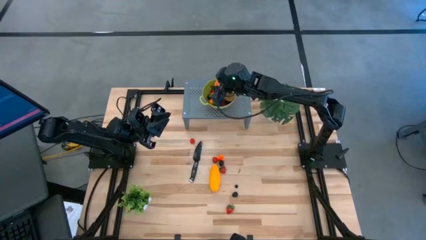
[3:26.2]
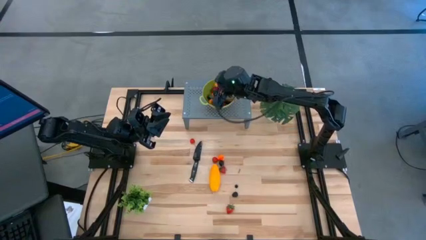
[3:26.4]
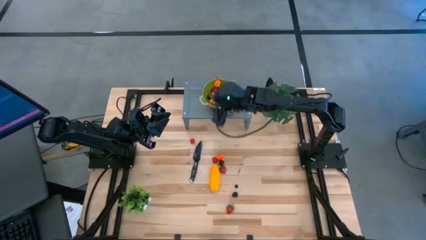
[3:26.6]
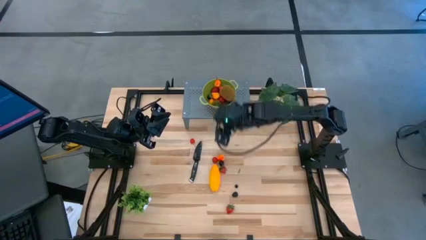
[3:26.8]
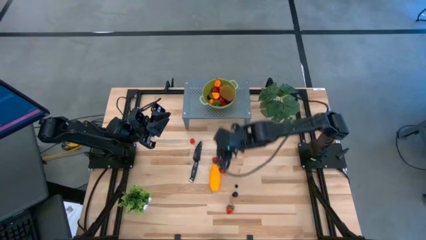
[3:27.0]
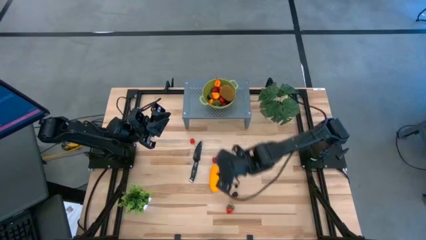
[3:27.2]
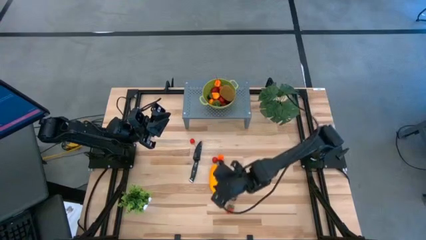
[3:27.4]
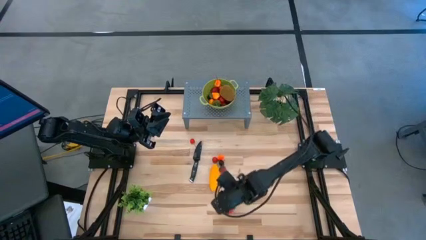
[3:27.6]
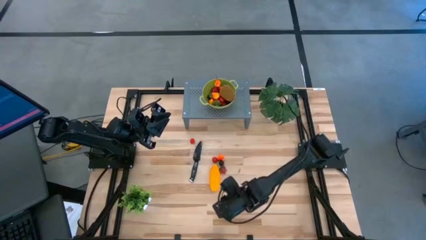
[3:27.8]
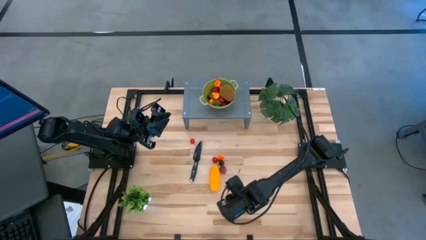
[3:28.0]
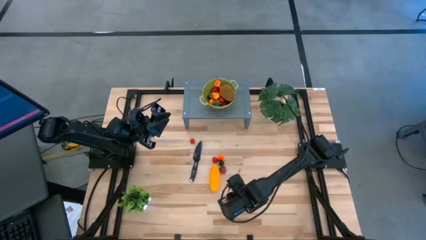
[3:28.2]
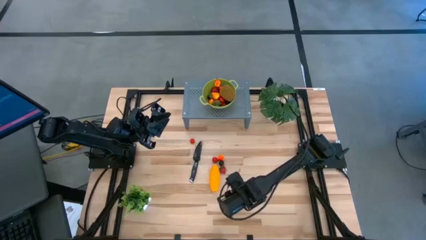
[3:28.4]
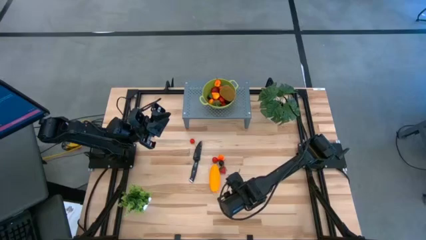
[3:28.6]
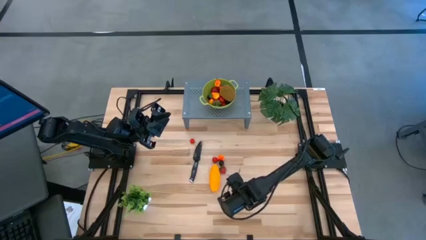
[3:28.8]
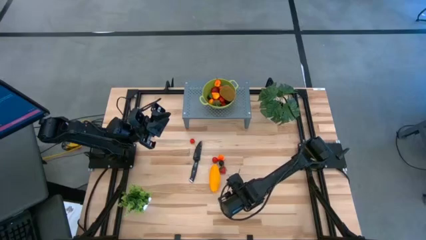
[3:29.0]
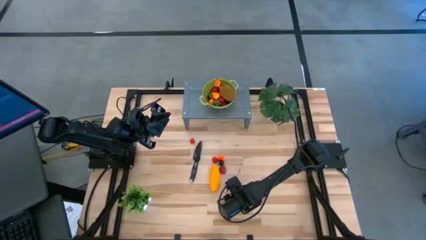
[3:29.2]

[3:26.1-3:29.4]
Task: Pick & Place Fruit
Put the blackberry into the green strainer bowl on the shelf

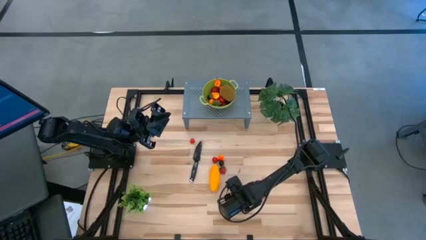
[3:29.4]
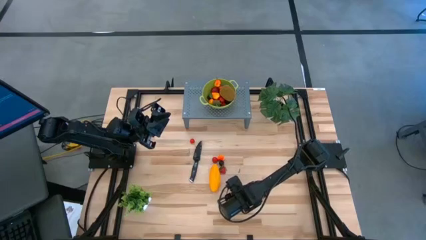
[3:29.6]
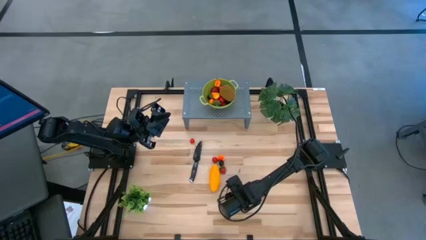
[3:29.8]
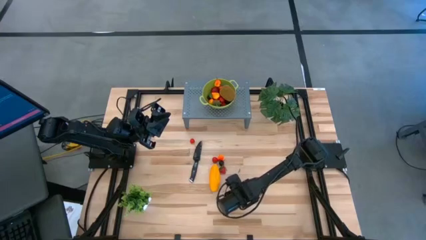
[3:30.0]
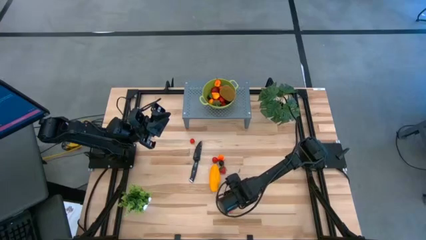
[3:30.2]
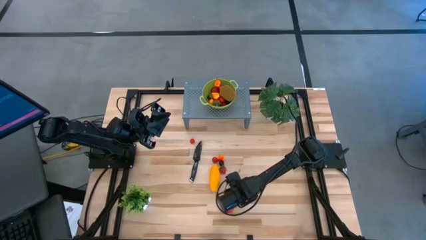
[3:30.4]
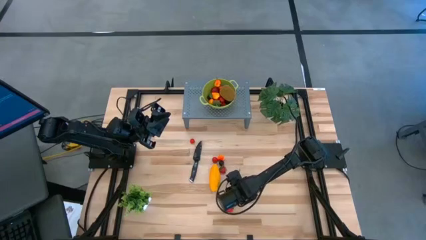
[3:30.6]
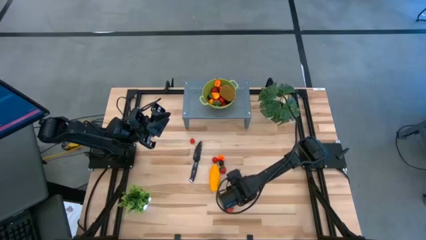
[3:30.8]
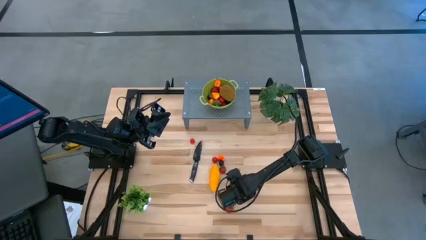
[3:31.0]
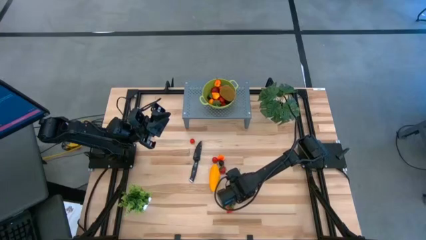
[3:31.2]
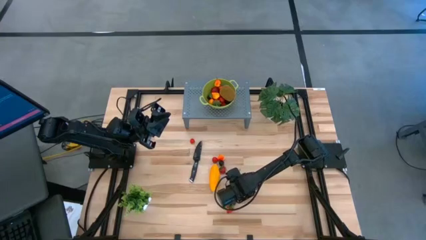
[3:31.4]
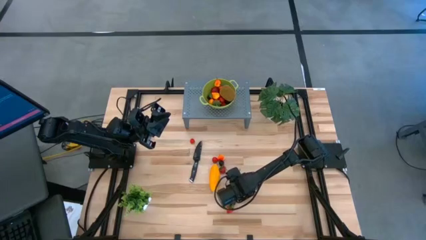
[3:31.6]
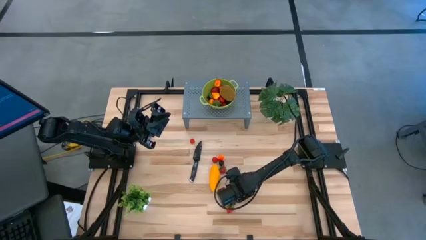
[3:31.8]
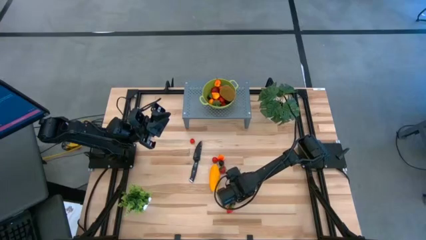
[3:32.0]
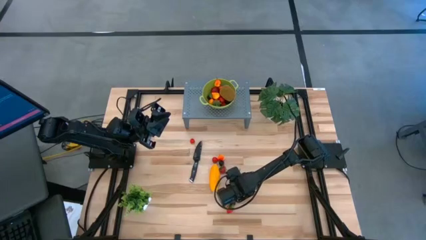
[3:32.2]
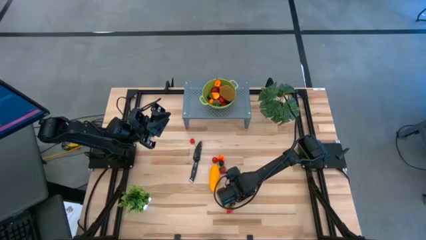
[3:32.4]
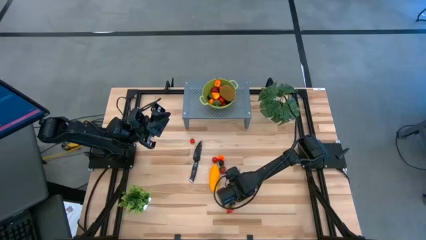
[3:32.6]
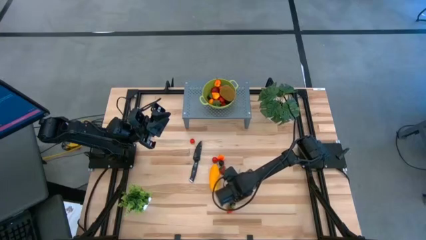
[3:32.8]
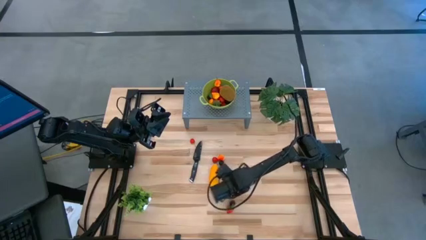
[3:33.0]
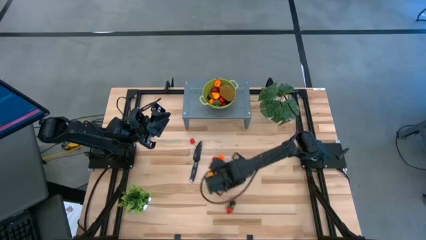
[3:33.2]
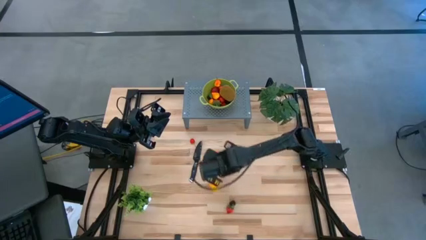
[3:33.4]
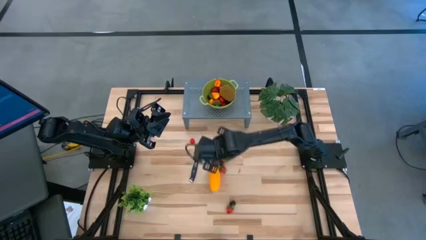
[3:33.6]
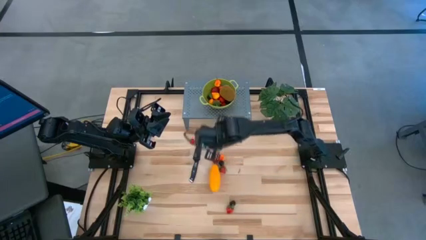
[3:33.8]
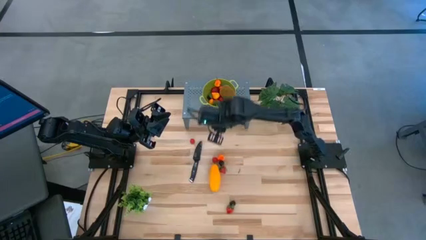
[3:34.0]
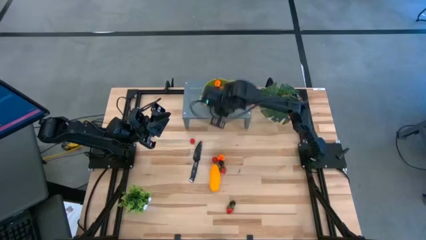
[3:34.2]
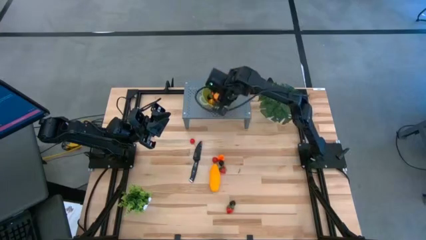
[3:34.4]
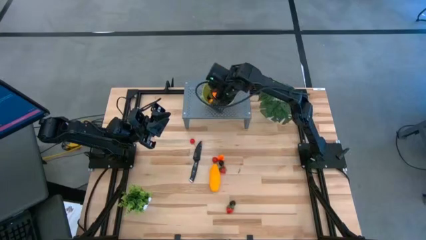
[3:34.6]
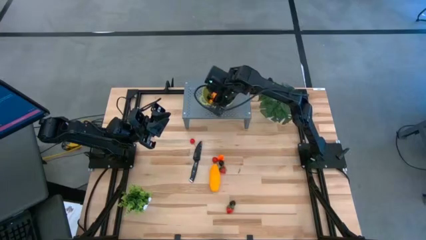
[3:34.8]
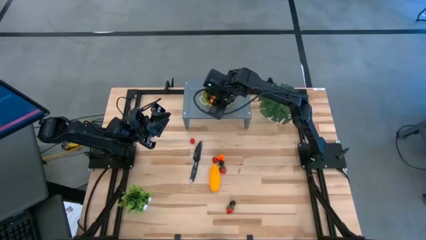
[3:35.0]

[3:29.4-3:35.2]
Put the blueberry into the green strainer bowl on the shelf

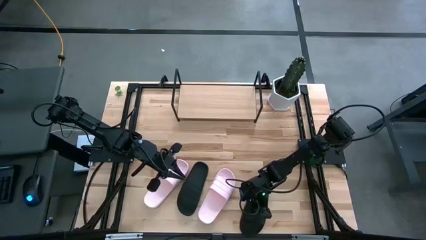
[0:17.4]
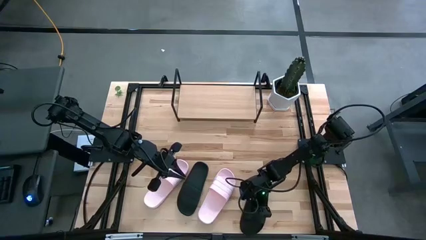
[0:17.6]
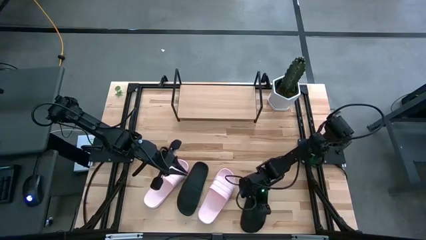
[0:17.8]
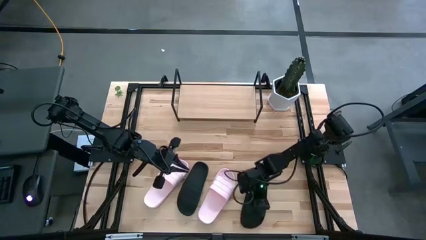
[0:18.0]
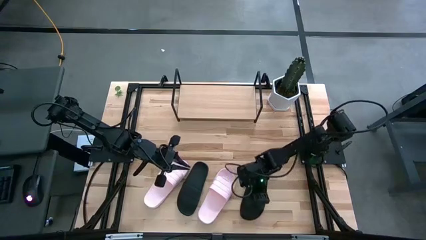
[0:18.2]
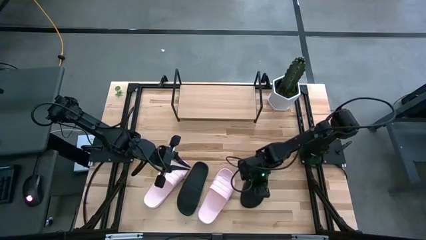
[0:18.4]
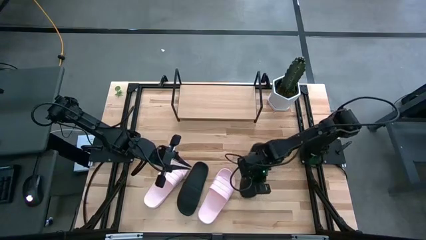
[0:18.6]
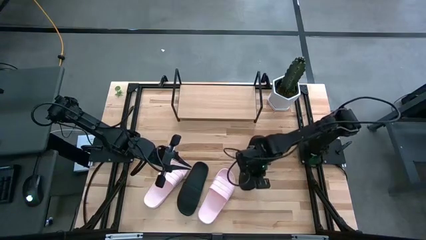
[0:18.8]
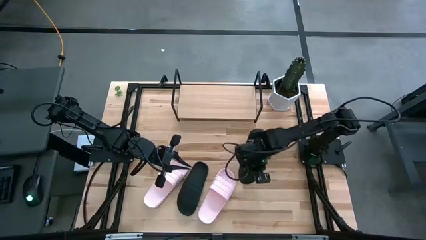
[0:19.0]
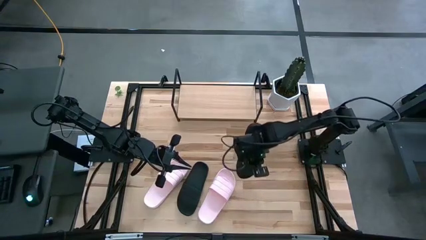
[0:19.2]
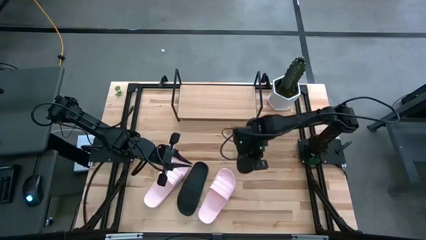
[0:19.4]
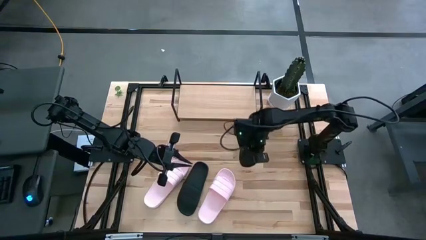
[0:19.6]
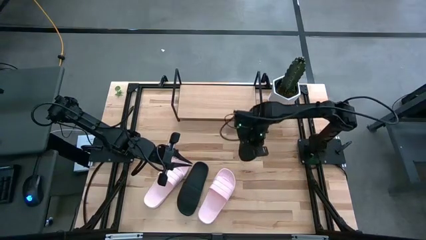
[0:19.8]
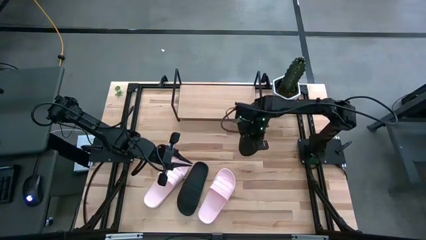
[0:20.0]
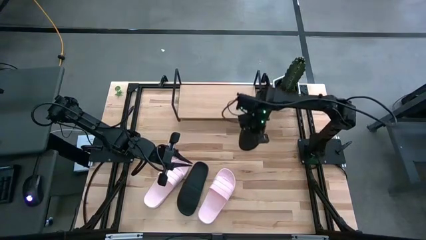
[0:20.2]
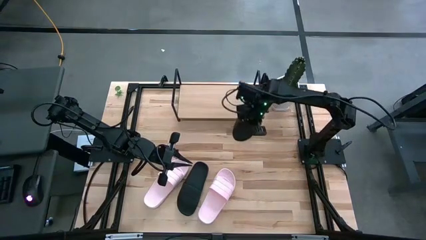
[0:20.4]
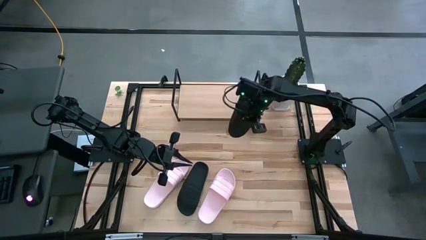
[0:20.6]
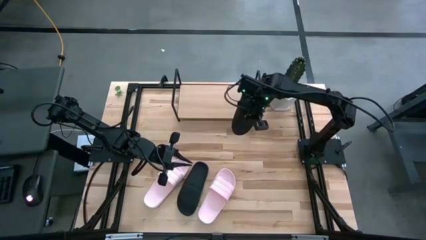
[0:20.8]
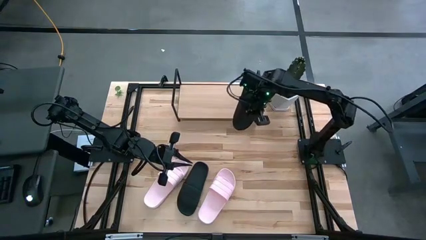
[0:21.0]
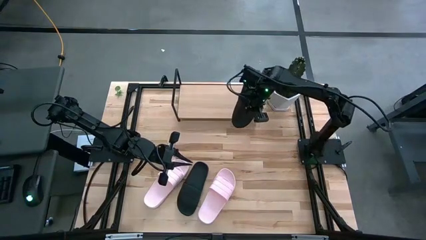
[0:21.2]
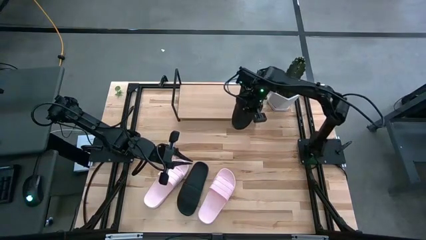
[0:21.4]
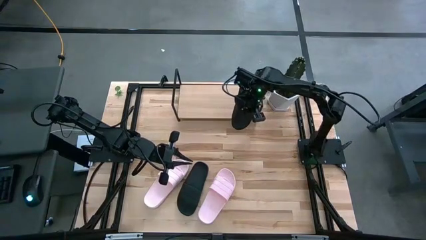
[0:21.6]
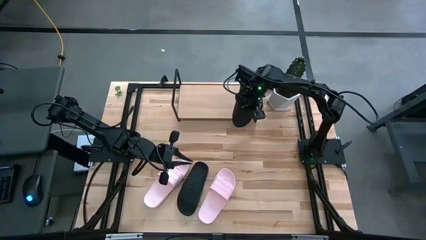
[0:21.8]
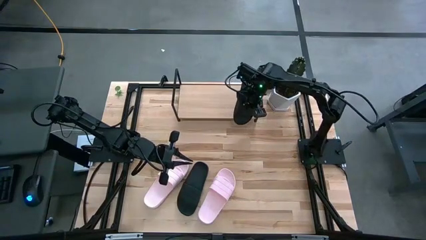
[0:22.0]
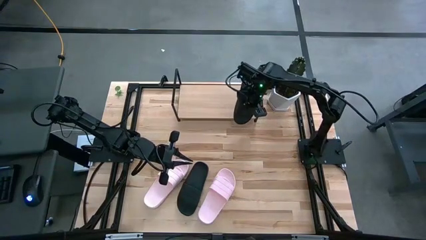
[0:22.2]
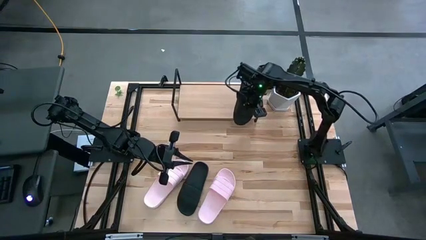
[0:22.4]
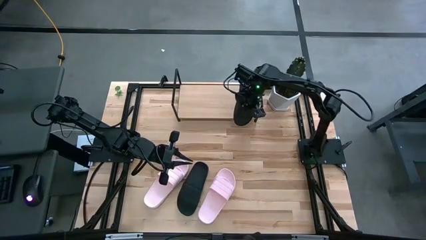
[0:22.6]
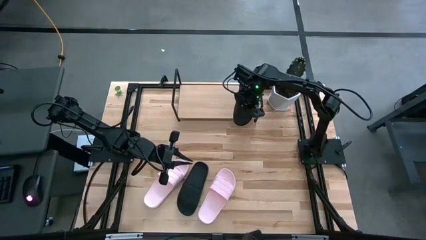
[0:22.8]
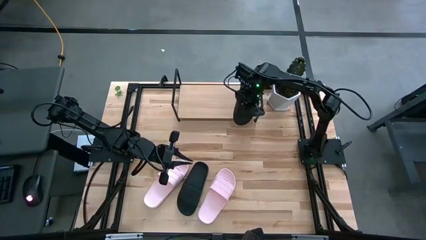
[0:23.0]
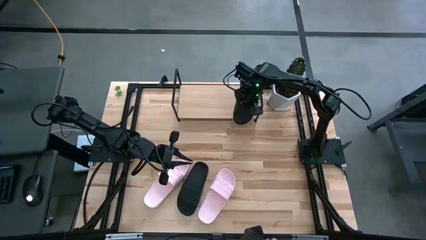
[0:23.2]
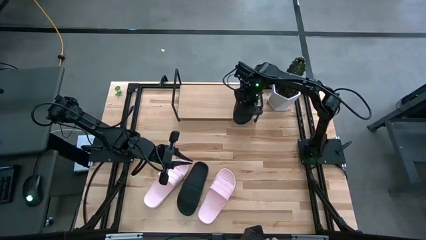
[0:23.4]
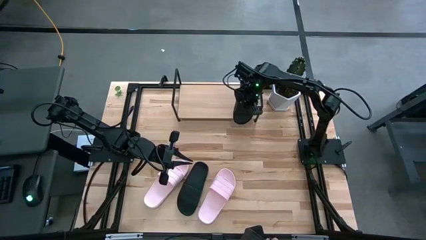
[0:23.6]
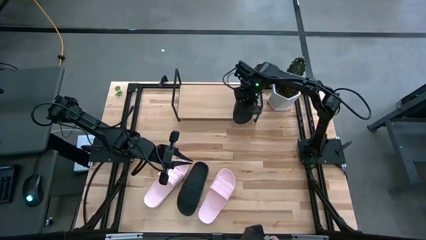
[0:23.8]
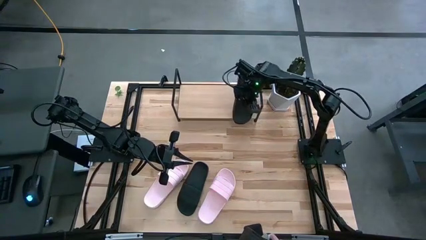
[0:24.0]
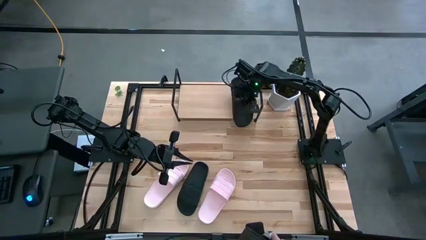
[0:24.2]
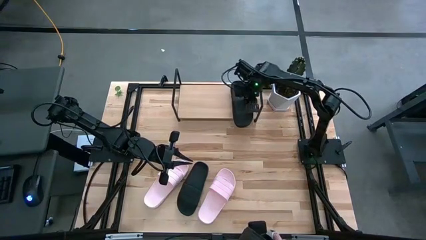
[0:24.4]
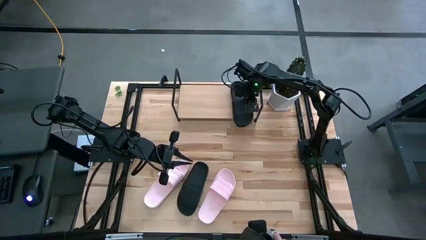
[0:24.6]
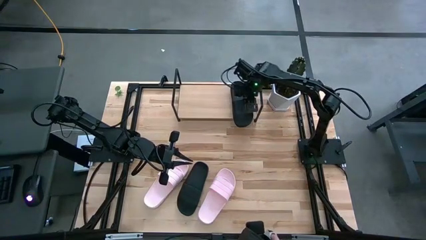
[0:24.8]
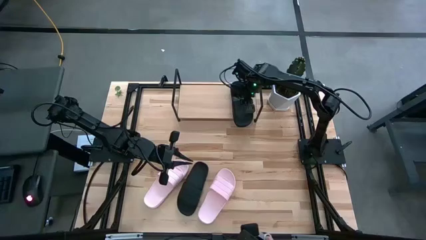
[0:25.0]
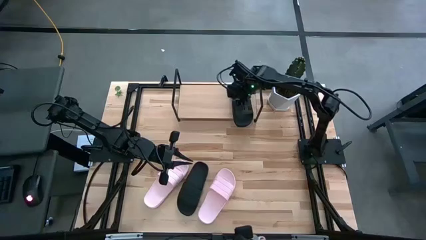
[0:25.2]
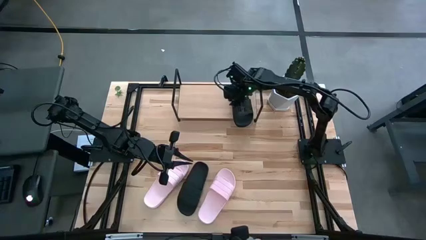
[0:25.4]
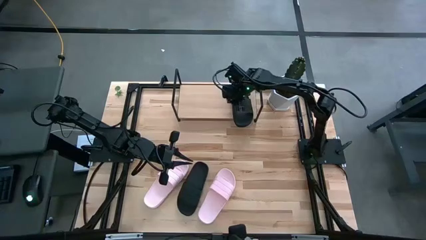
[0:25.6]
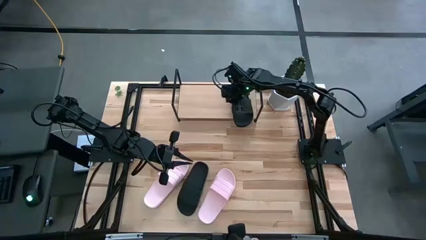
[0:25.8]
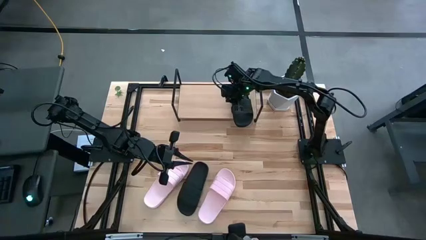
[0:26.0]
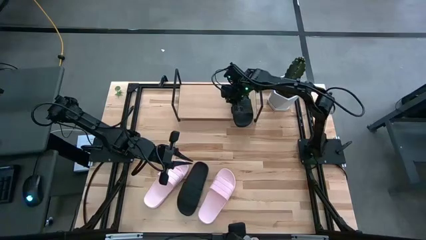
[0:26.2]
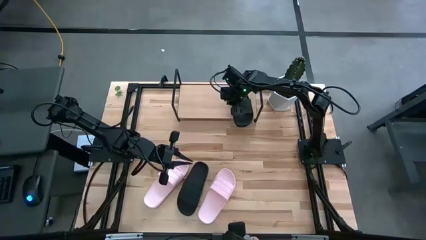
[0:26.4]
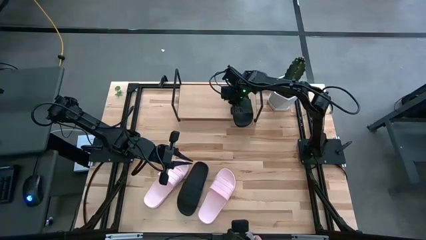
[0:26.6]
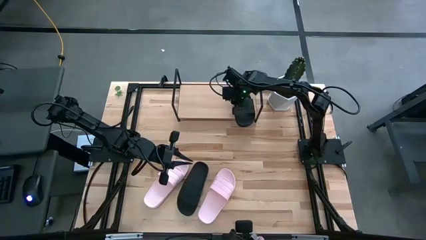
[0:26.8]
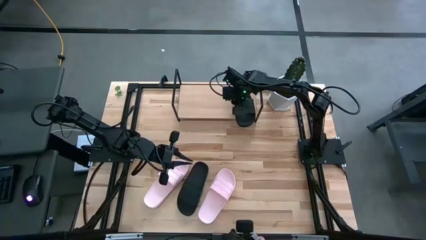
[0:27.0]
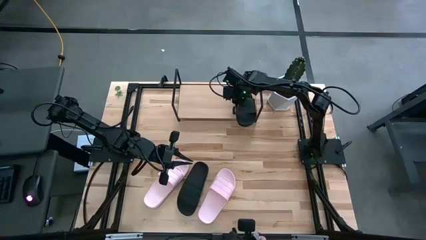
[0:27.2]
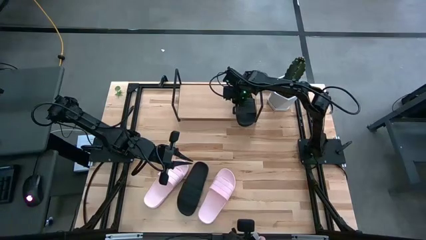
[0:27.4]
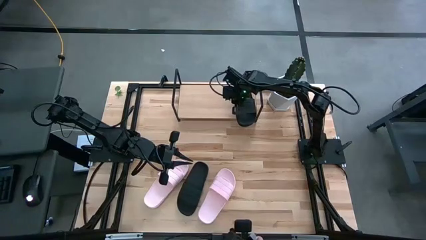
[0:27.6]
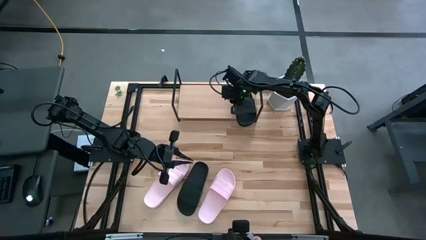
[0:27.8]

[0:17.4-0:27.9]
Task: Pick and place slides into the shelf
Put the right black slide on the shelf
